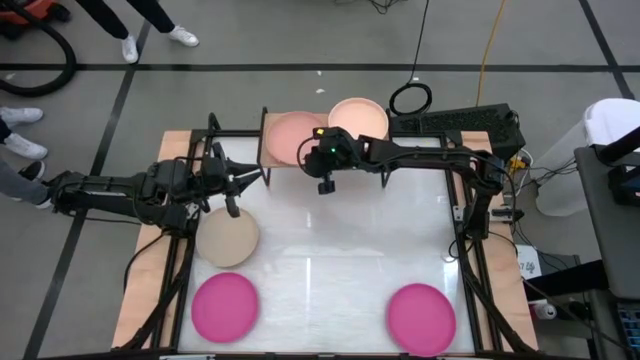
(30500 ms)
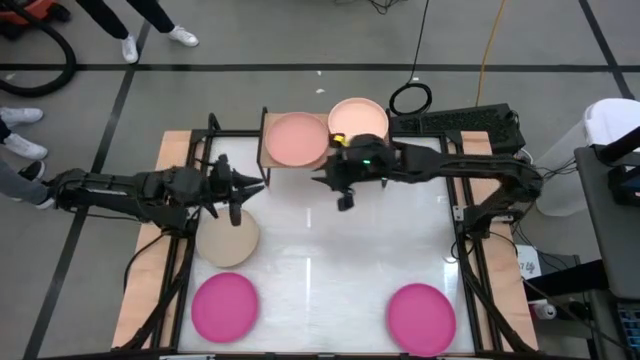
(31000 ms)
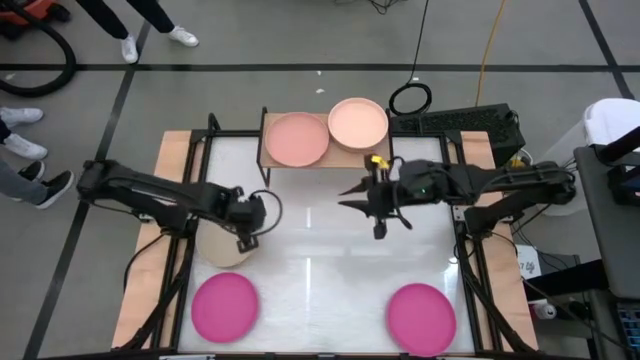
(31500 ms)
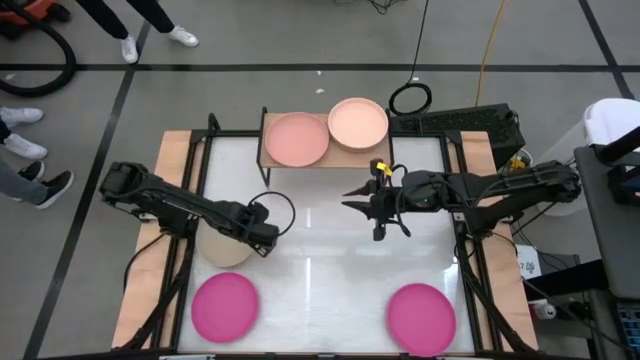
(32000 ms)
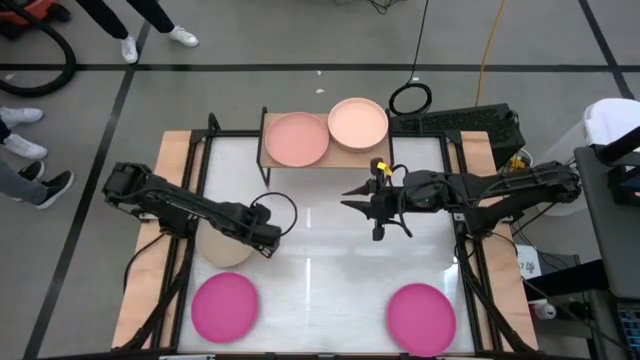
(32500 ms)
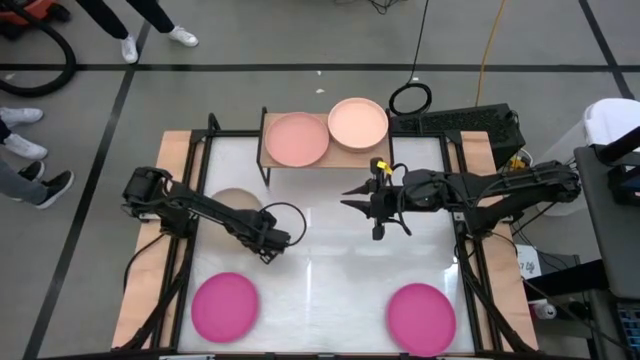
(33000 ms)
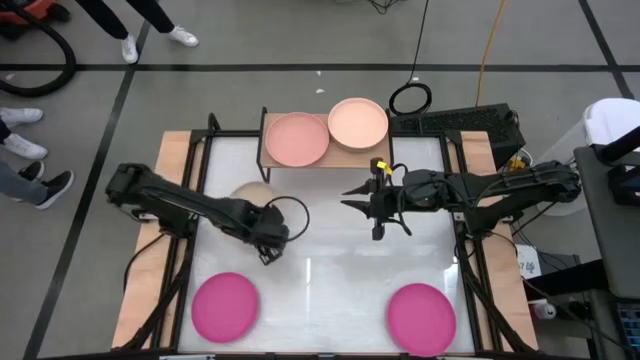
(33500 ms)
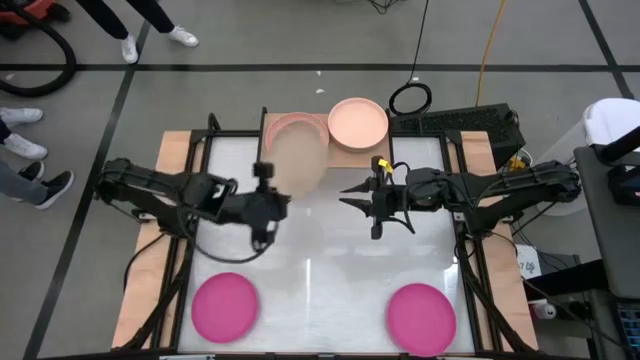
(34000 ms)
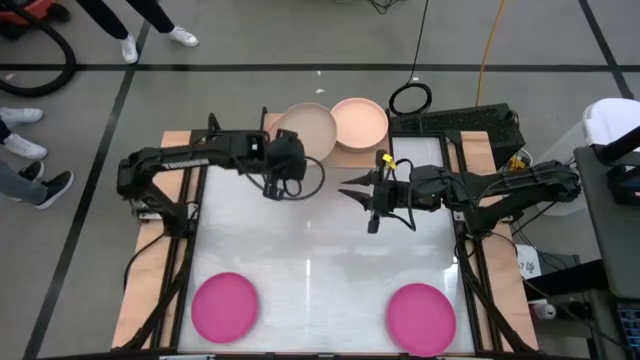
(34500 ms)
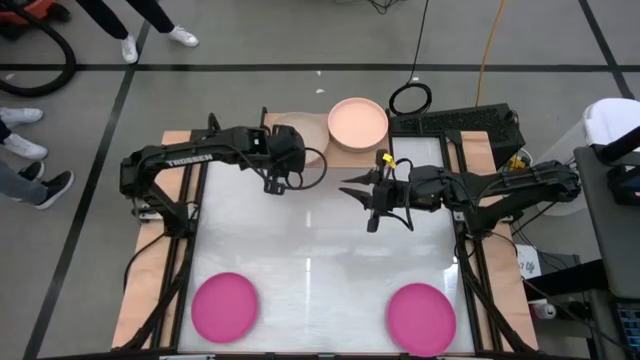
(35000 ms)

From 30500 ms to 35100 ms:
Task: Place and stack plates onto a shelf
Stack the gray plate on top of the light orange plate on the shelf

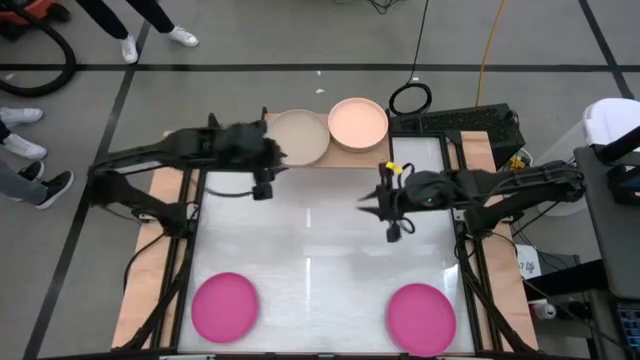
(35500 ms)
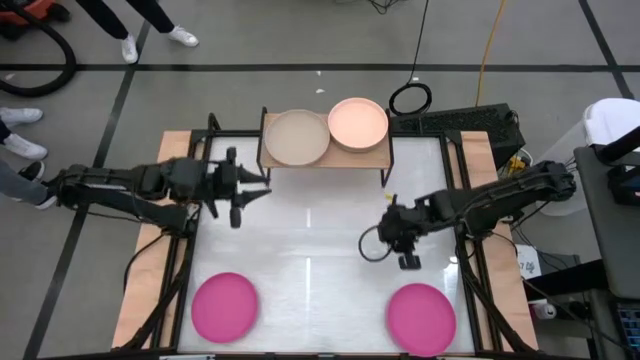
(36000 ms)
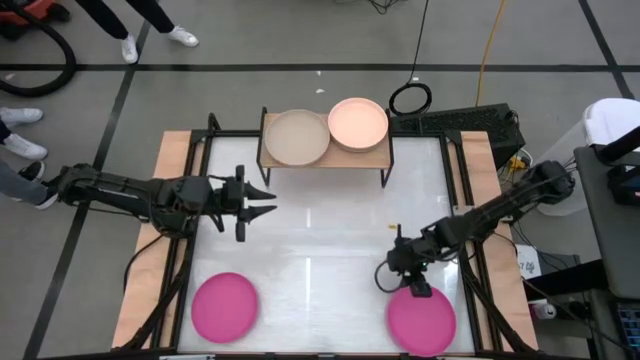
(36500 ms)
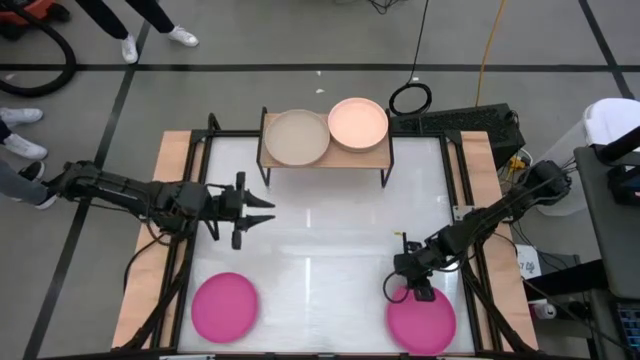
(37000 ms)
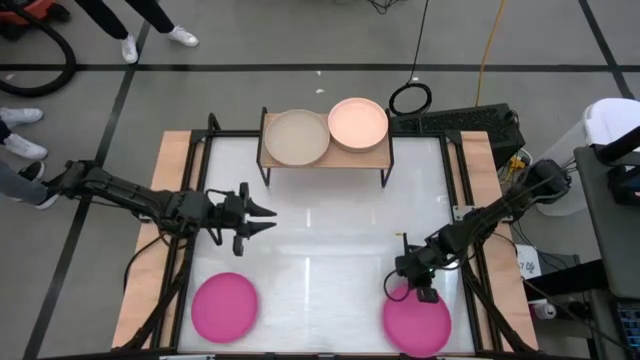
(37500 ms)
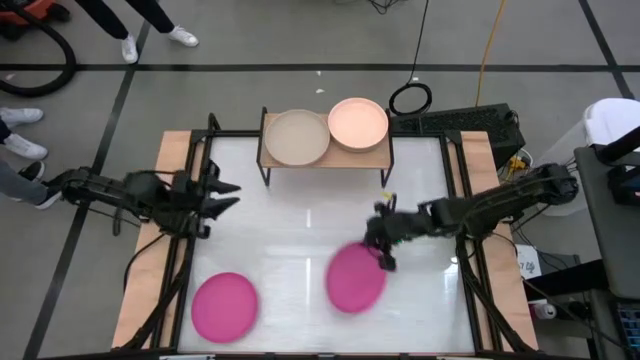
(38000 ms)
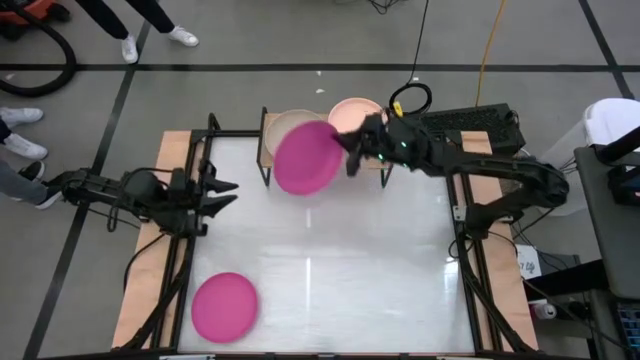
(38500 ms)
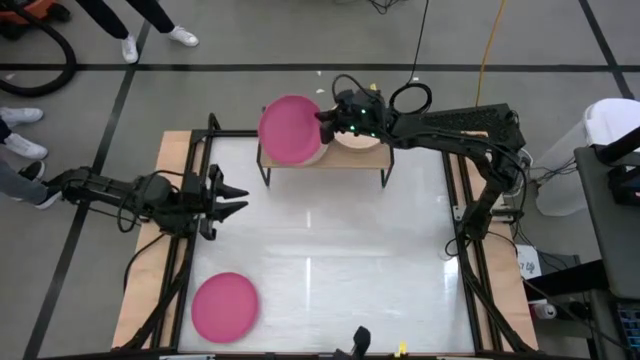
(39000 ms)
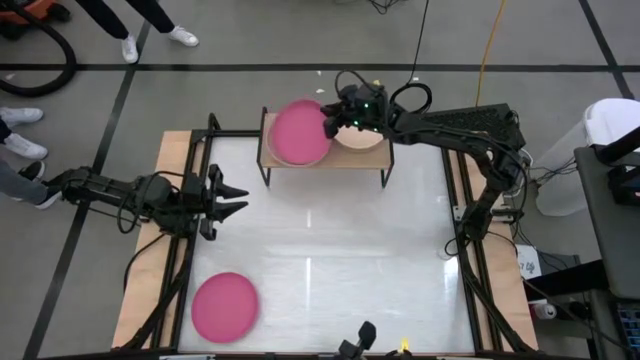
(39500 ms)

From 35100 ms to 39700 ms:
Stack the right pink plate on top of the gray plate on the shelf

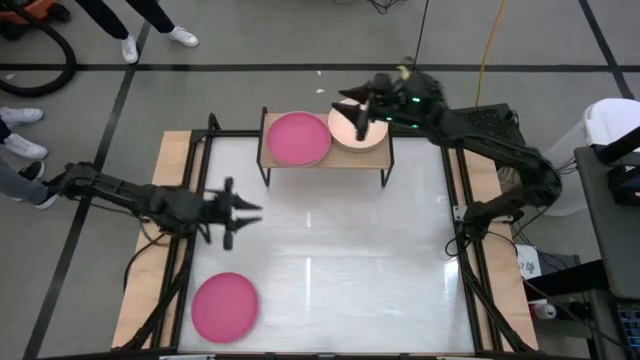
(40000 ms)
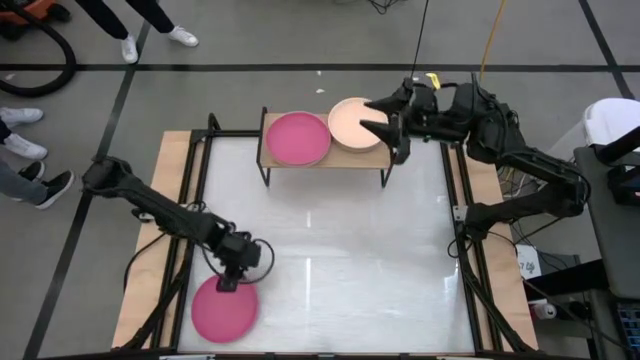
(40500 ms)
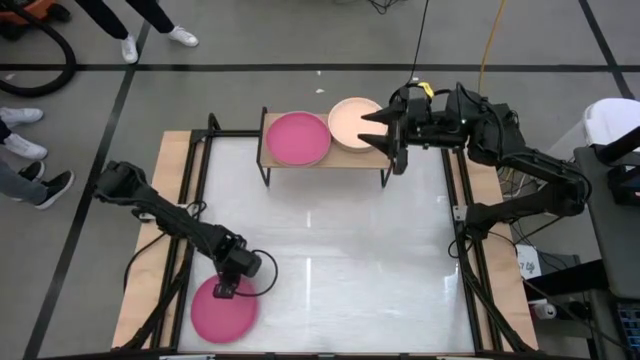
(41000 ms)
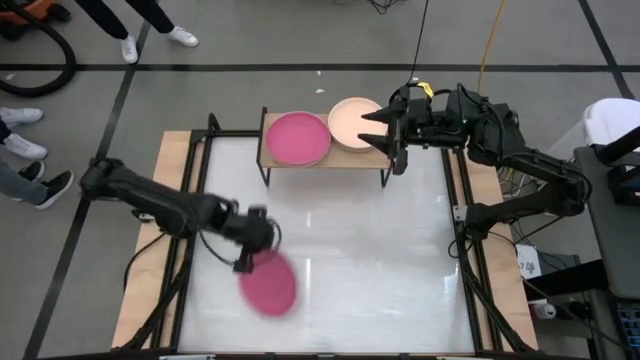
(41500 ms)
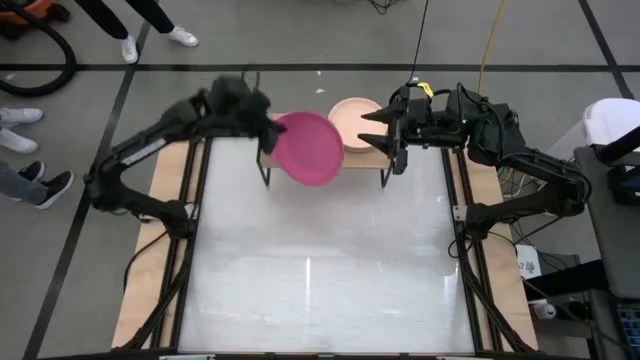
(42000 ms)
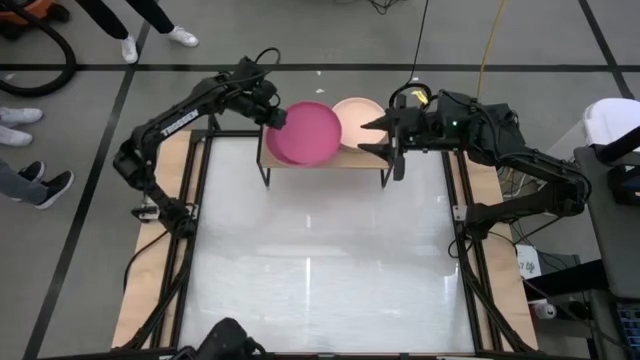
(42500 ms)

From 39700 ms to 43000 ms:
Stack the pink plate on top of the other pink plate on the shelf

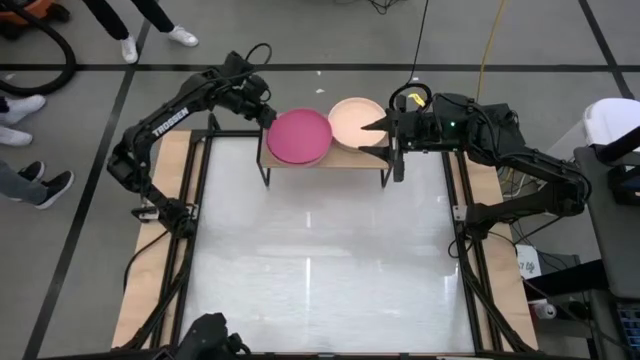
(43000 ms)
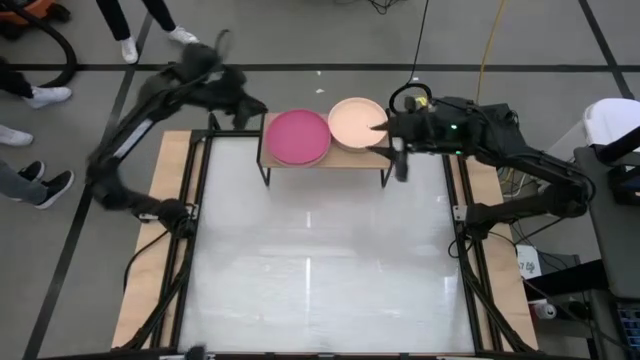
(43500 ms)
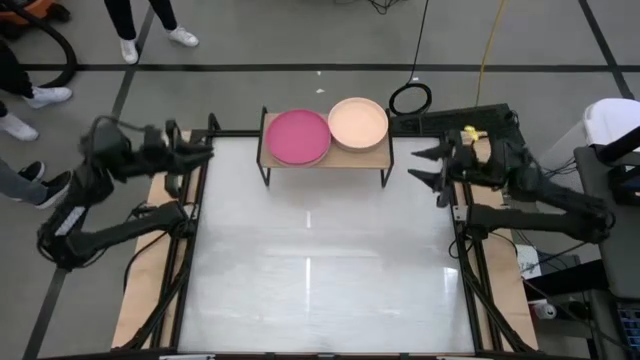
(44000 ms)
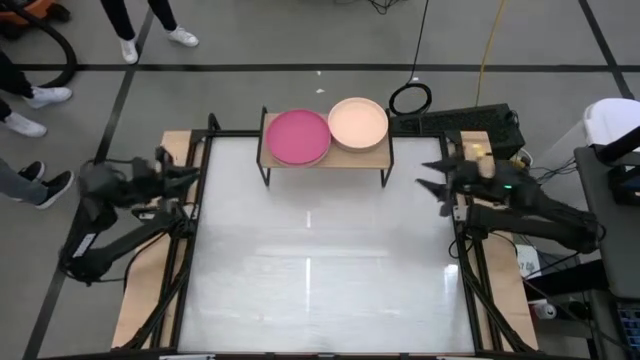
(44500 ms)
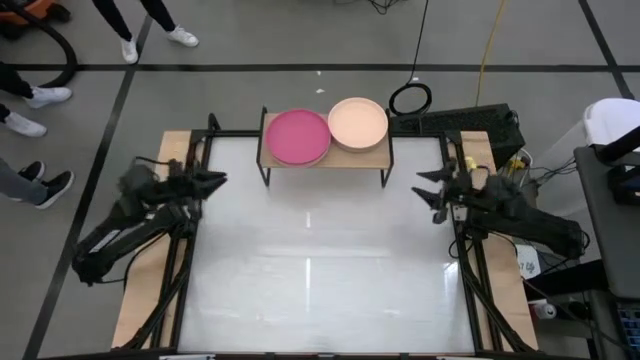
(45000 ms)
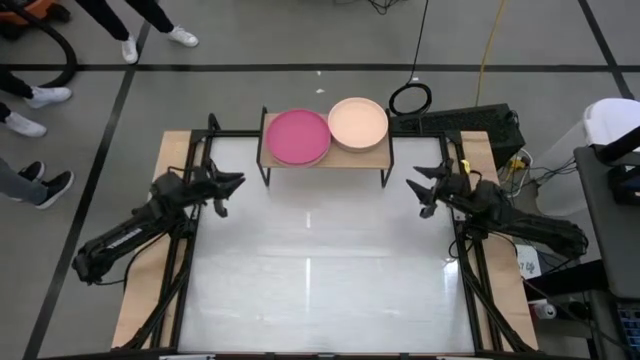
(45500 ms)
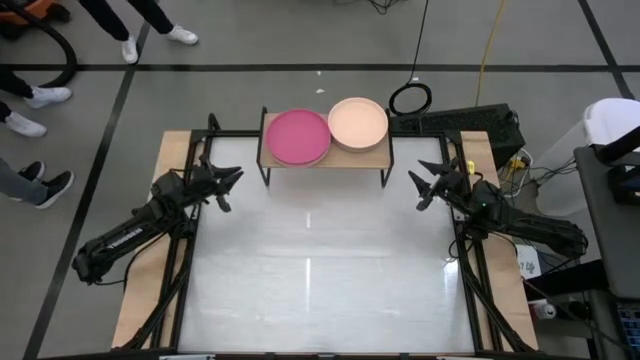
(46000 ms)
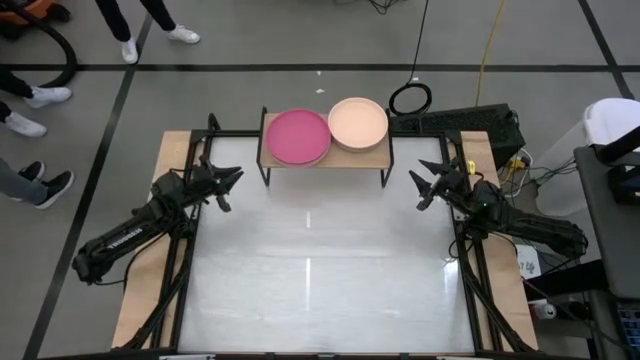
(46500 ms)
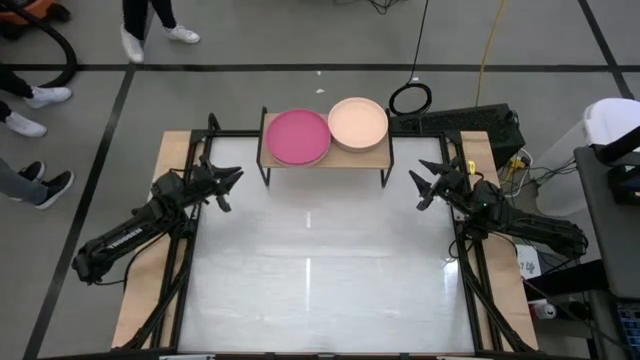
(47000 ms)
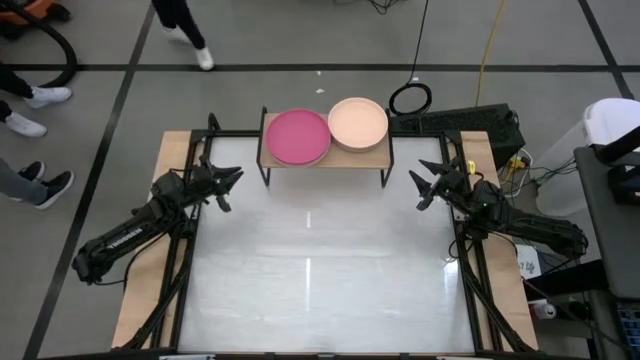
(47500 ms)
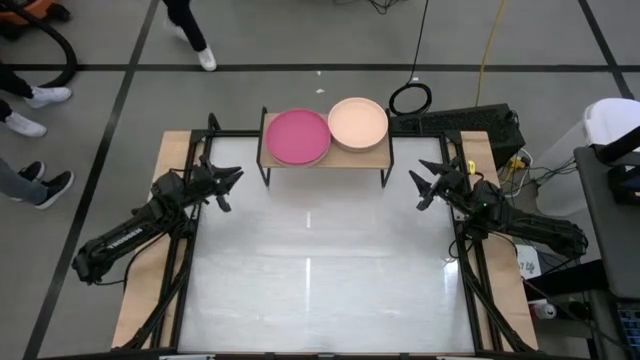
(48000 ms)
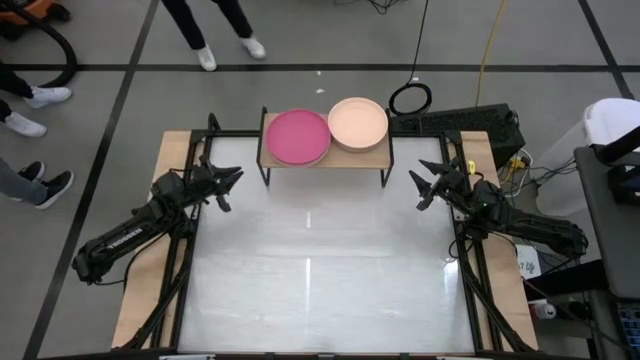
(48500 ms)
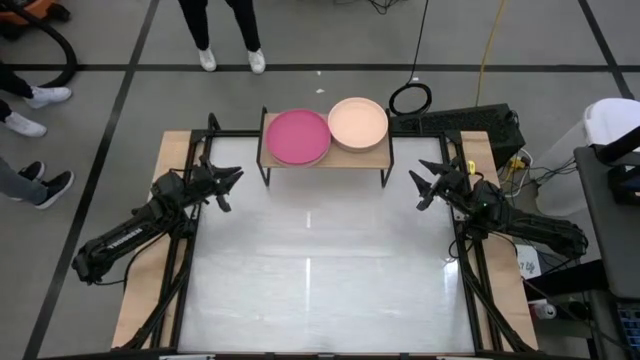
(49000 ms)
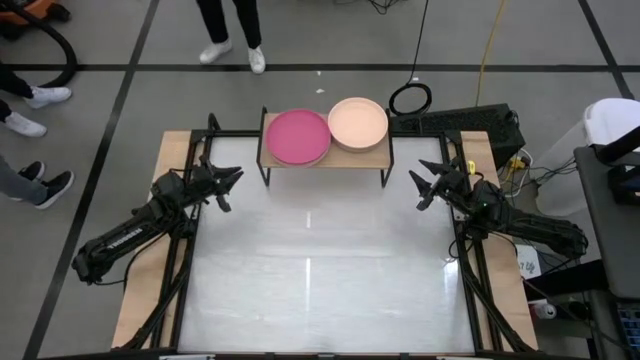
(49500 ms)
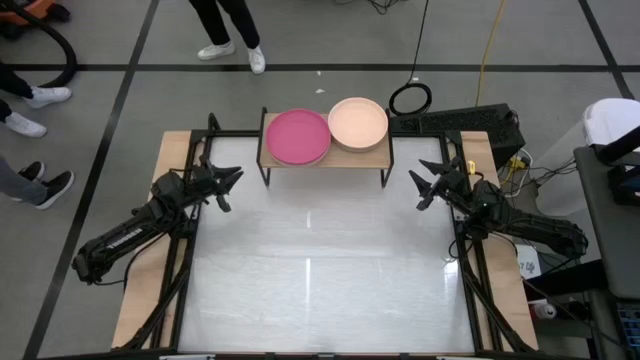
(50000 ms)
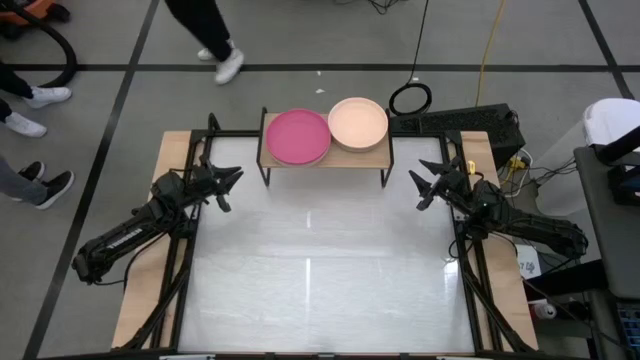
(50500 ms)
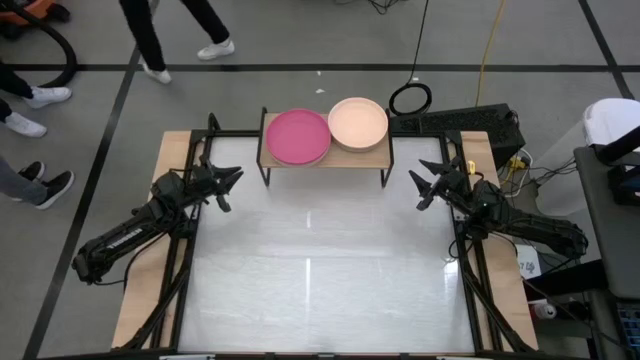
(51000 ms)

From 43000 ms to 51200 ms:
Return to Home Position
